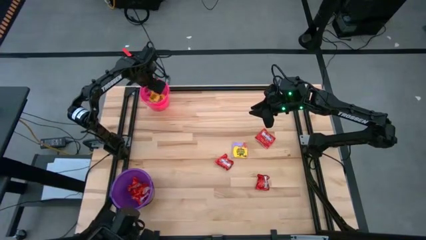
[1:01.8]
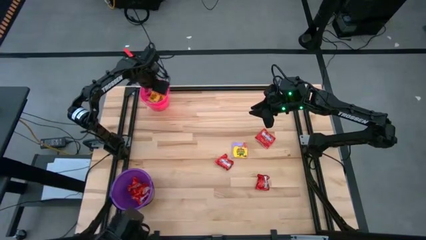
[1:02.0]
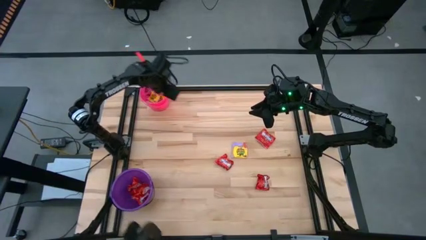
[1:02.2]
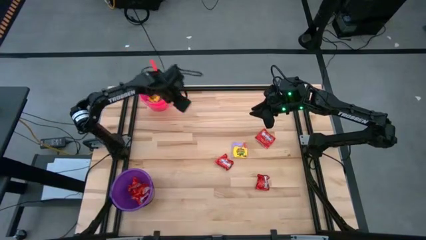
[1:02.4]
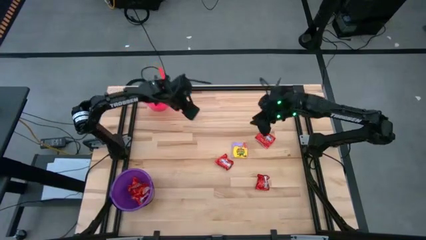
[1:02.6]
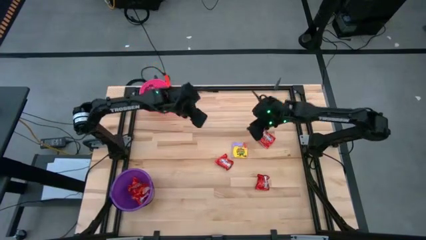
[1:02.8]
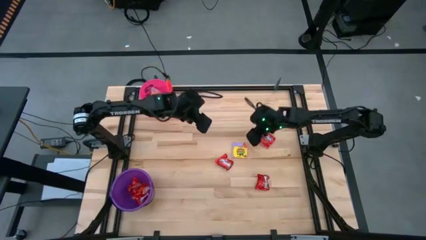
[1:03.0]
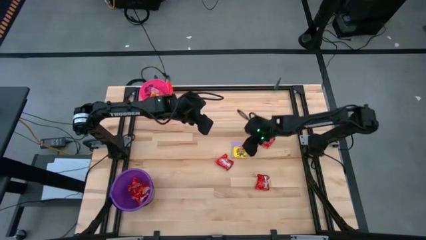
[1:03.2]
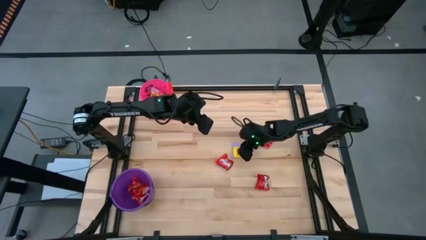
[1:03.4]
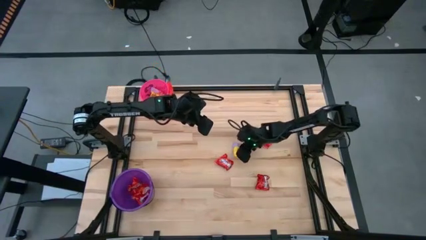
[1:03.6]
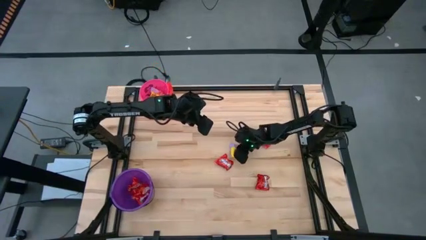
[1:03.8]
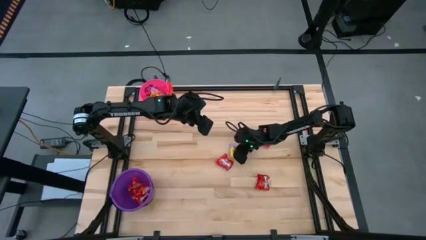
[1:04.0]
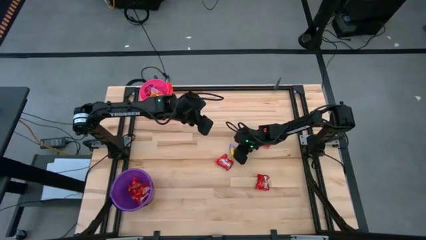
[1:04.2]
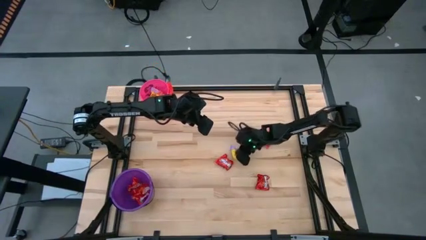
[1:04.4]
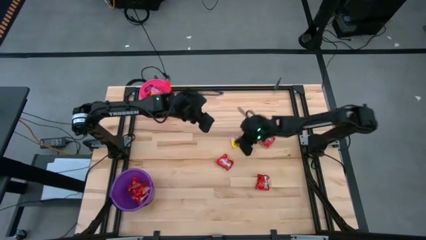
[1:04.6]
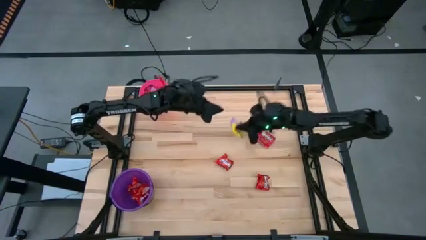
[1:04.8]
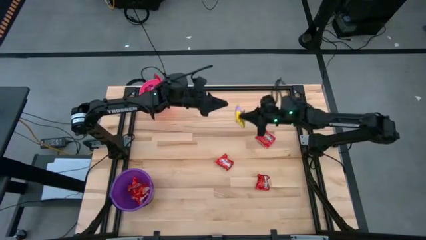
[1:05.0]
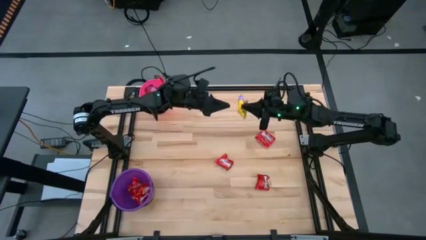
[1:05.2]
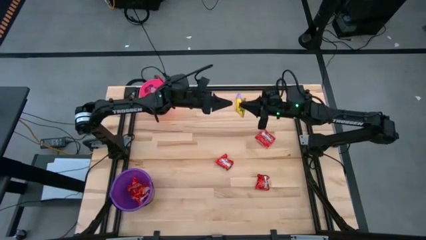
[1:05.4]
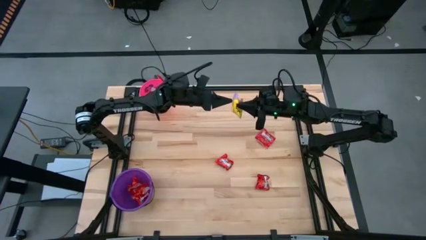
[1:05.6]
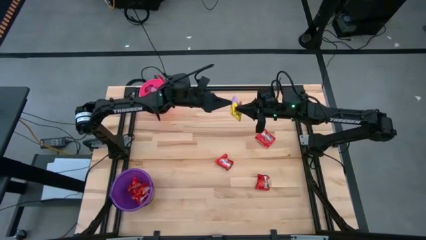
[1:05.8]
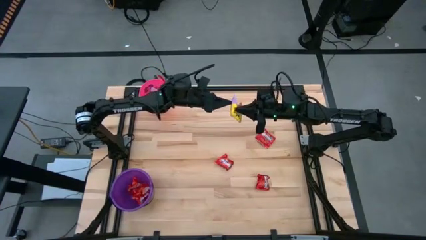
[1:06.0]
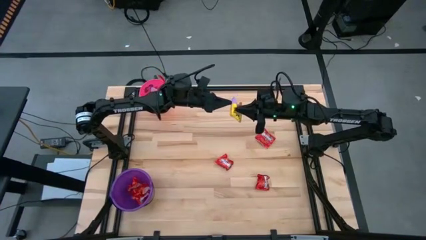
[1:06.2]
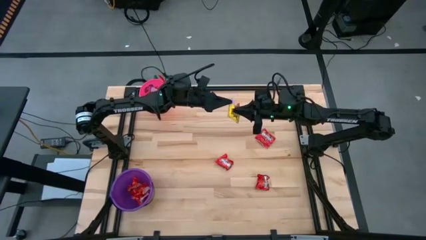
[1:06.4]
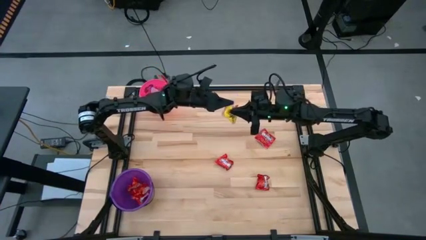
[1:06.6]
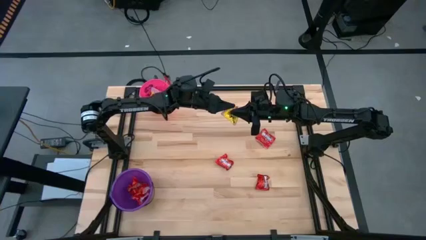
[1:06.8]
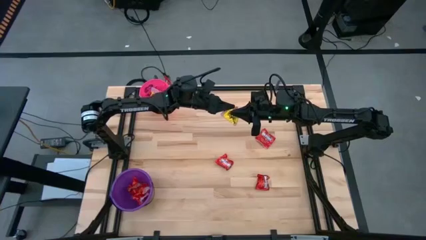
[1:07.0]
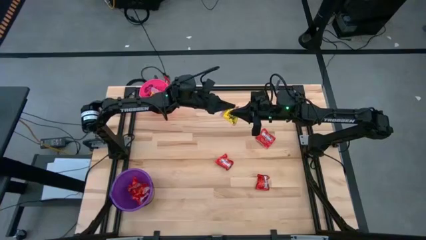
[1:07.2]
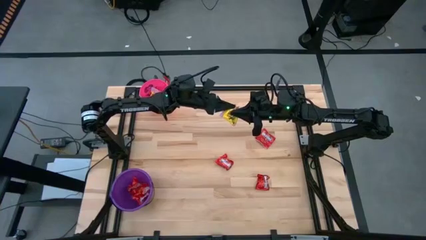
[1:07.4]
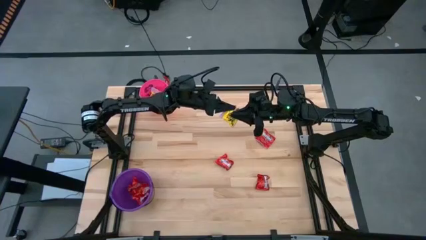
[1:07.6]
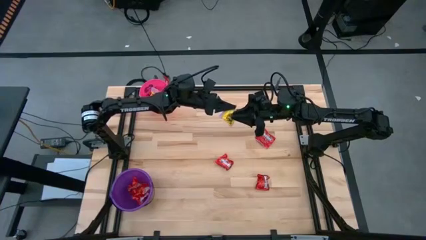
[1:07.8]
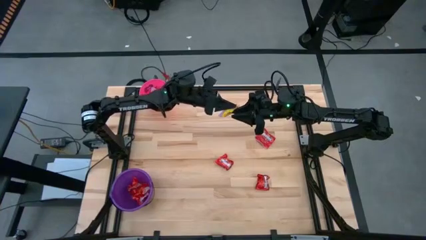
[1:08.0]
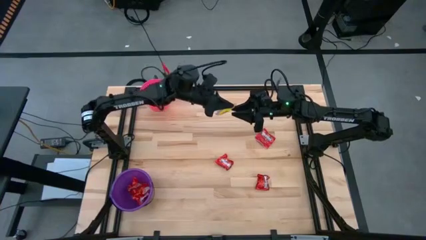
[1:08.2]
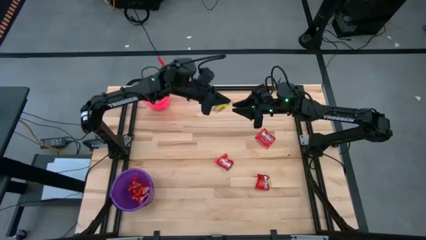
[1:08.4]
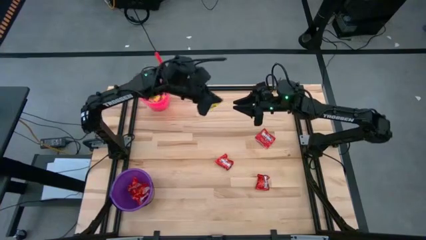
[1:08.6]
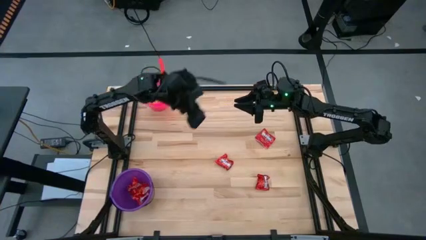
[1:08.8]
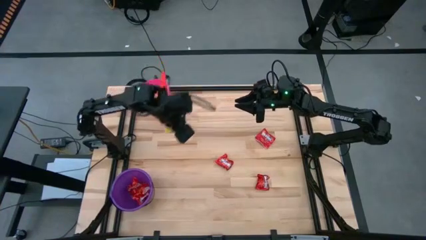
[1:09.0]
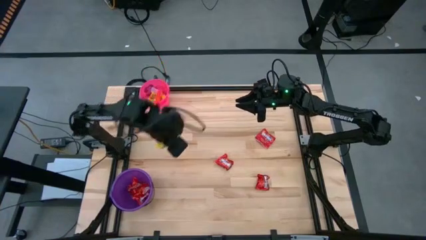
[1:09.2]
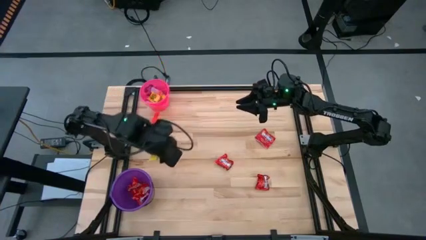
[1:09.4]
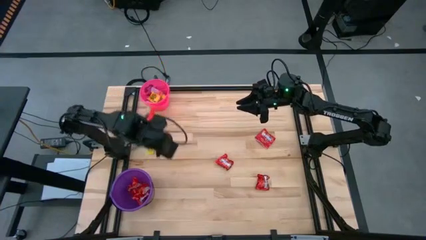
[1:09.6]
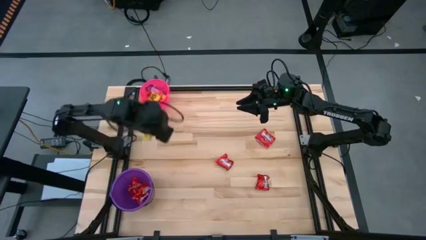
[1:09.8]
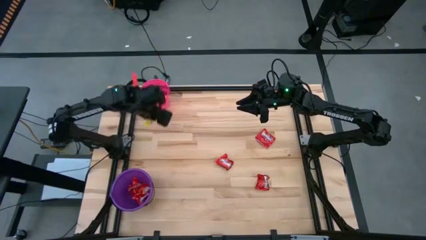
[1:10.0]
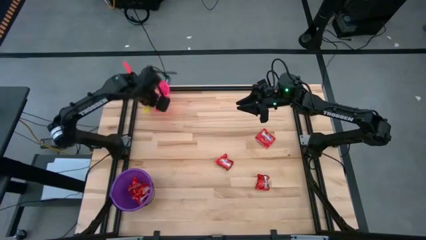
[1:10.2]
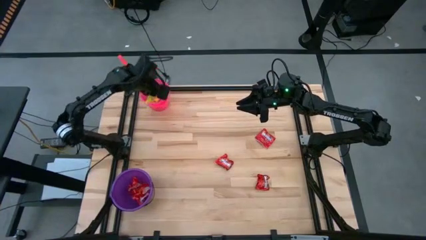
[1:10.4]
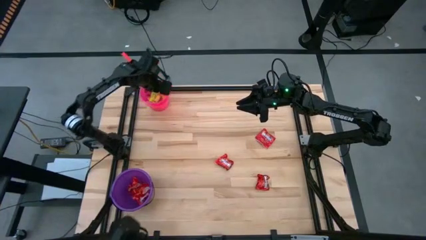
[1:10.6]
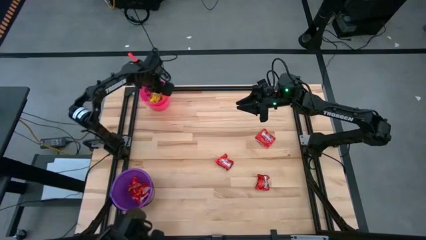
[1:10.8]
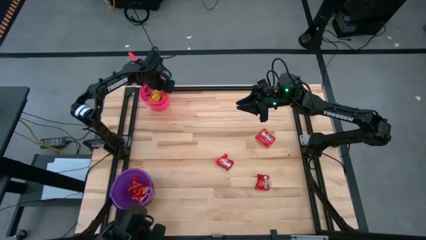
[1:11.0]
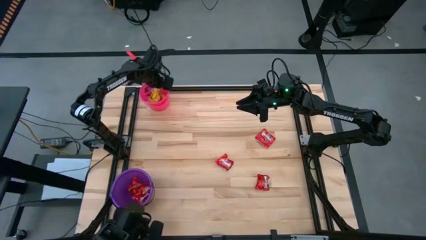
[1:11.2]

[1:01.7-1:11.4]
Task: Sort candy by brand, put in halloween buckets
Put the yellow candy into the pink bucket

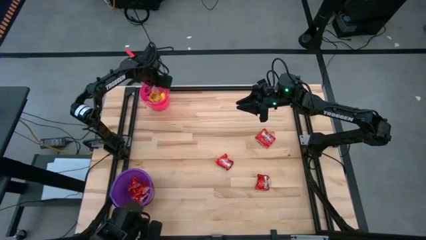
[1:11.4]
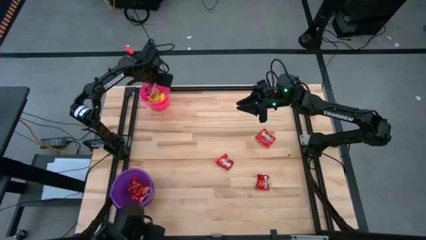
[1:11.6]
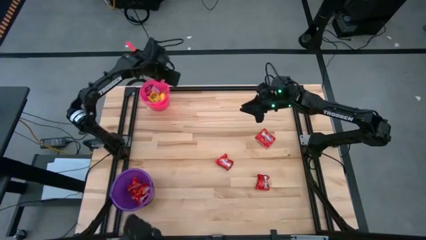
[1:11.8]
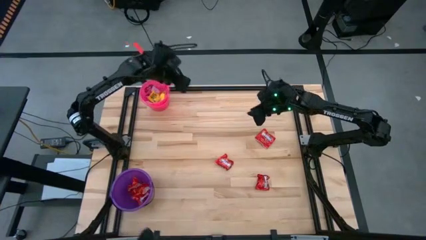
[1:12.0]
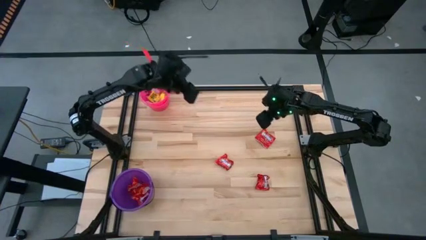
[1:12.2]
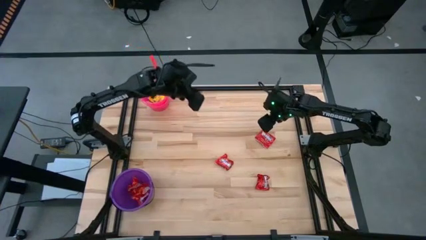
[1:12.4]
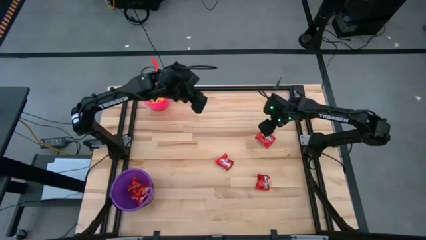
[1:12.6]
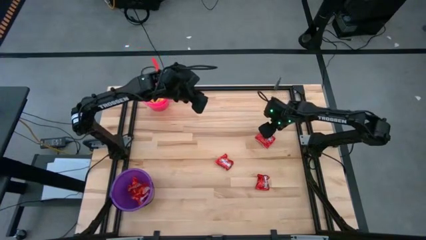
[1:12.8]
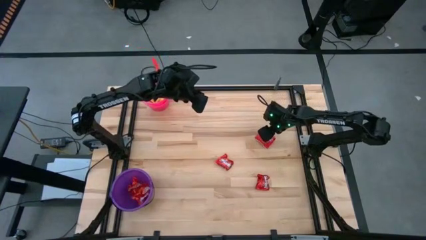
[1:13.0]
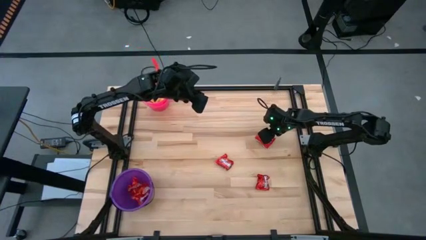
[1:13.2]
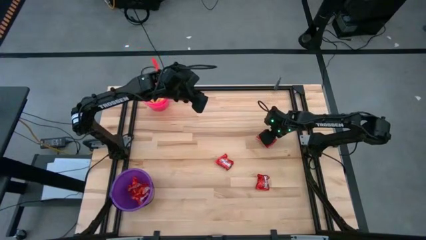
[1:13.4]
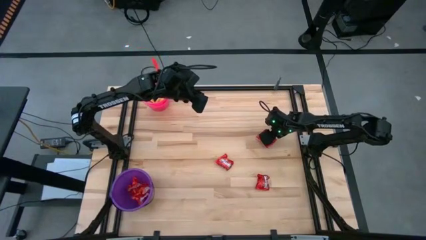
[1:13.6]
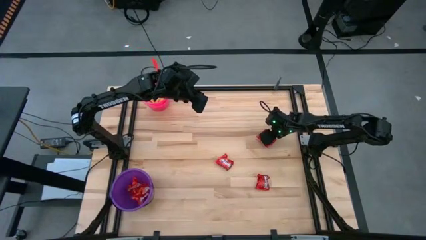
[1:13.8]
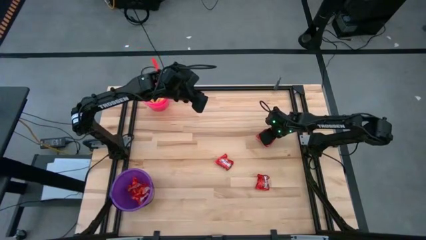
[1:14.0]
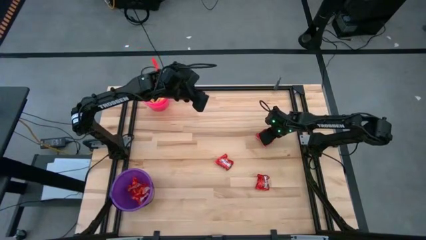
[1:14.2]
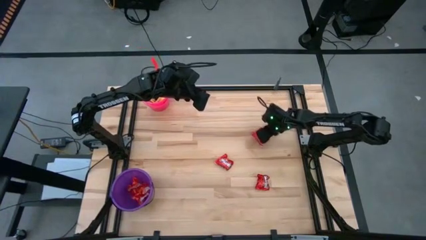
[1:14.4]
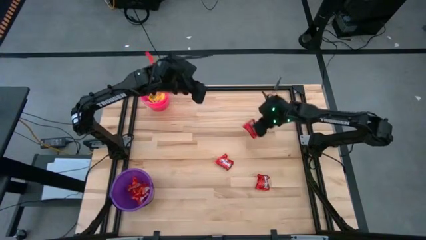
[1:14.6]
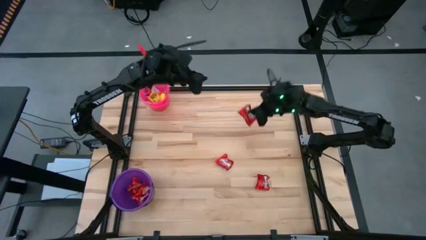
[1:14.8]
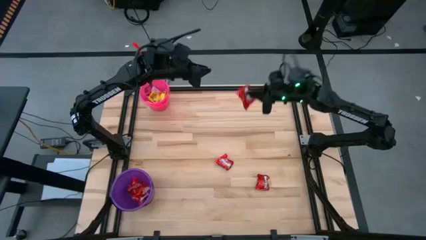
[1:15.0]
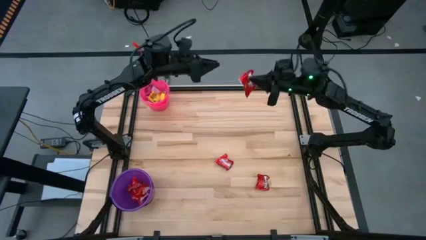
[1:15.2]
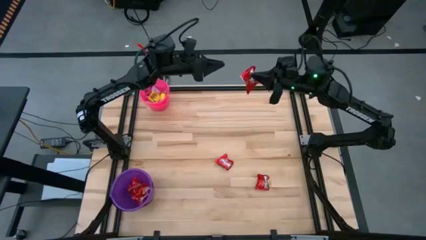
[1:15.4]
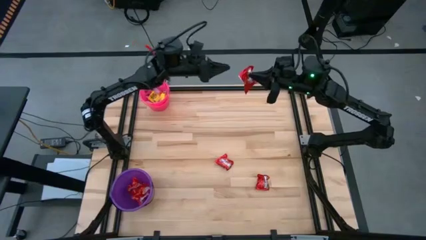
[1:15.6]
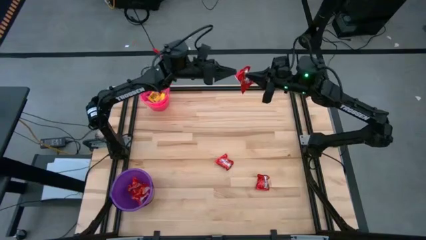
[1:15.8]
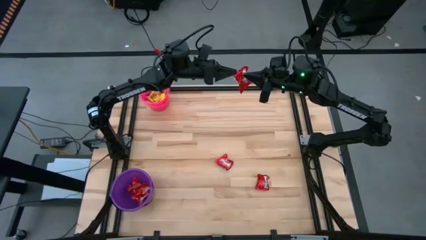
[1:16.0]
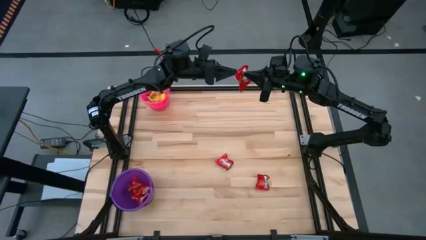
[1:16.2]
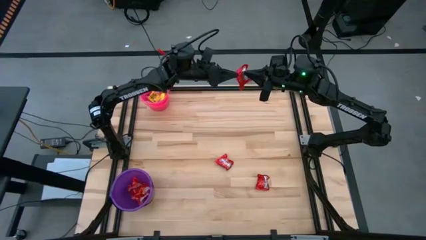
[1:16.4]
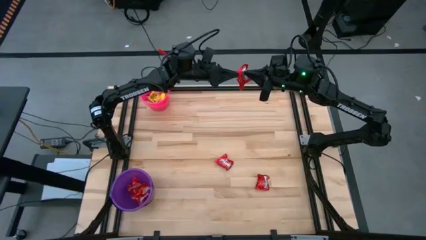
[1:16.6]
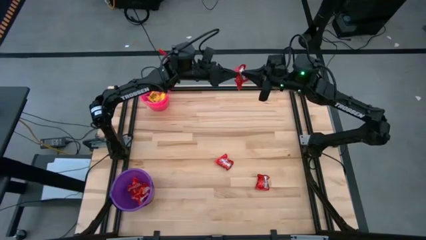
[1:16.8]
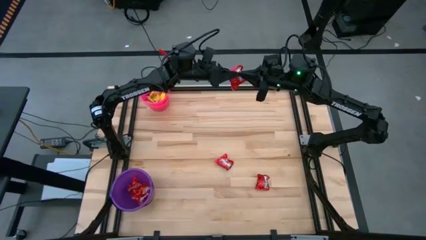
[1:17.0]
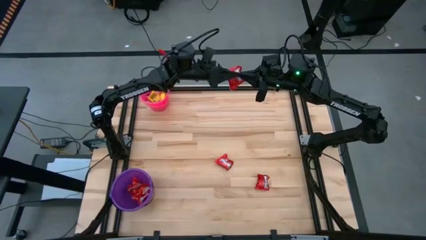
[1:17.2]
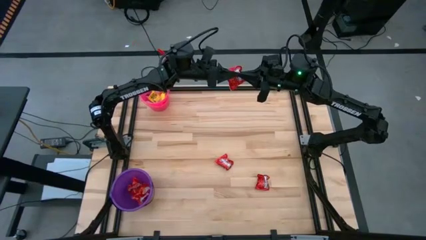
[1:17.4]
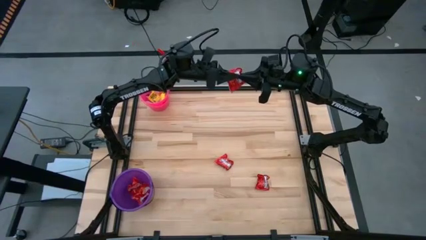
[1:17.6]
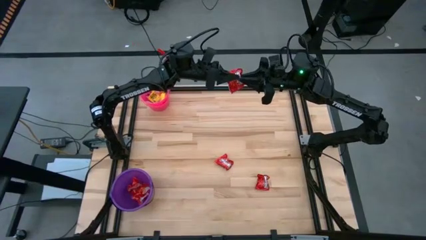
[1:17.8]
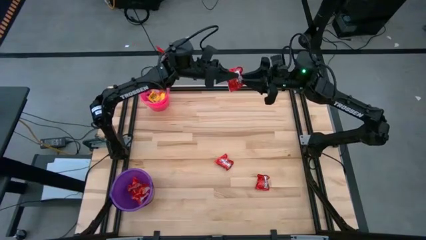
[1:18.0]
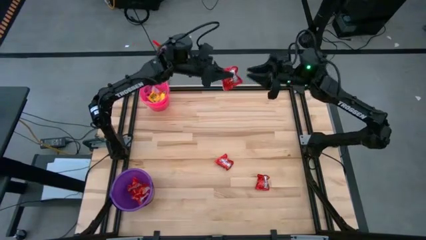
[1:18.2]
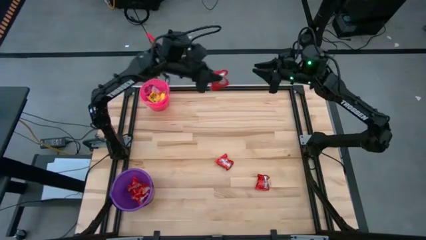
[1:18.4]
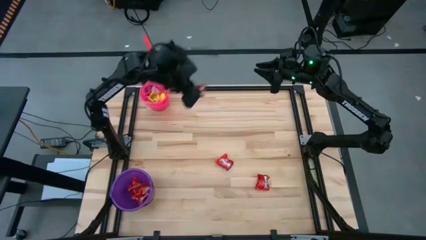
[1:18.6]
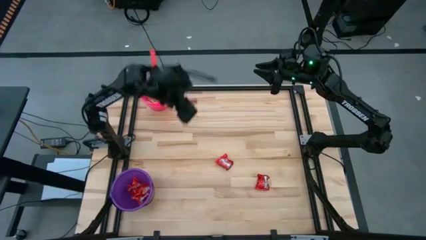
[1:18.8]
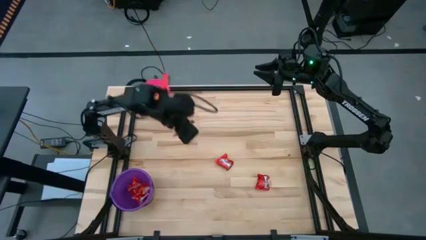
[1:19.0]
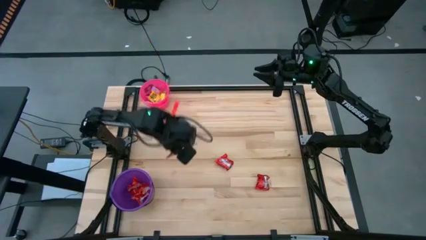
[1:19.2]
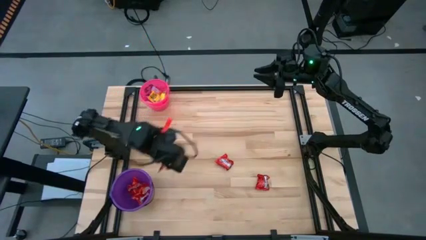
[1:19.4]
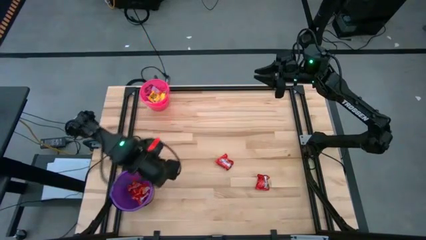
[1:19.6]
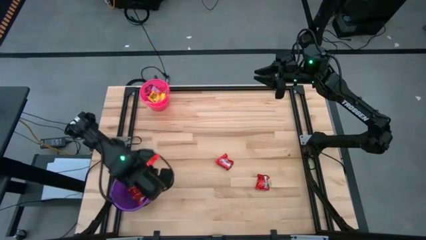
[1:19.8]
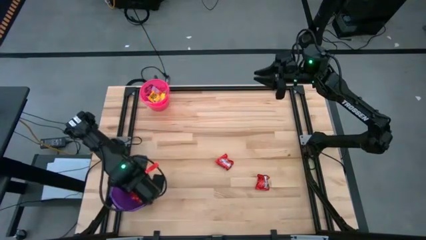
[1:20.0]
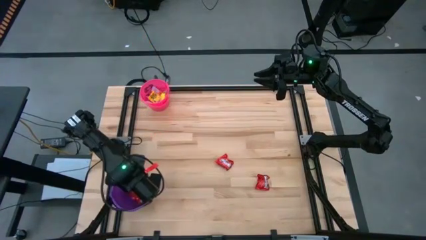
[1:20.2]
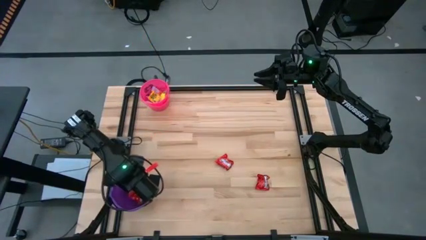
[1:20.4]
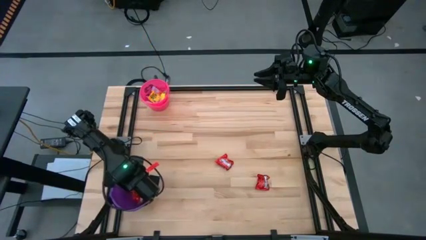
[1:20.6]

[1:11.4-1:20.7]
Put the red candy into the violet bucket
